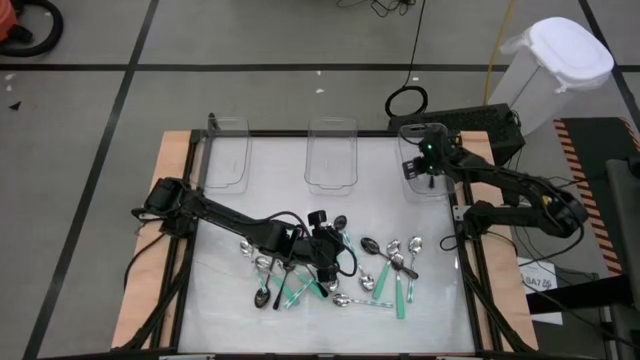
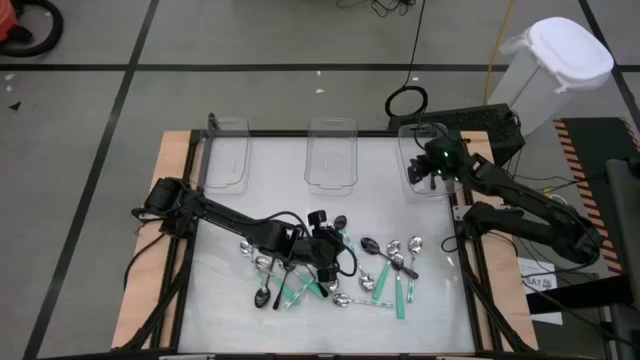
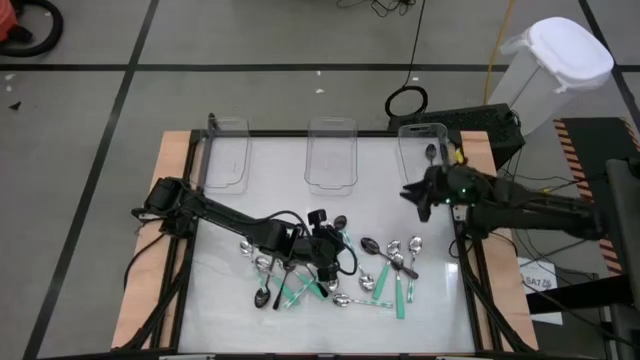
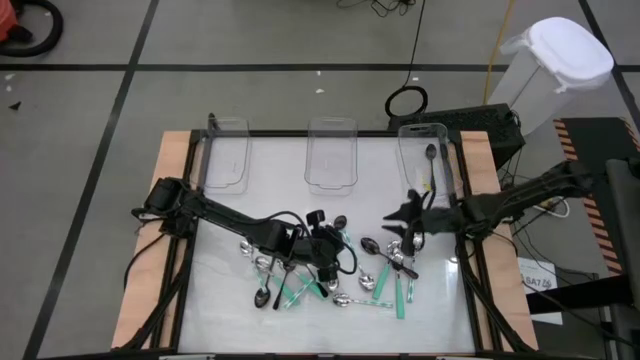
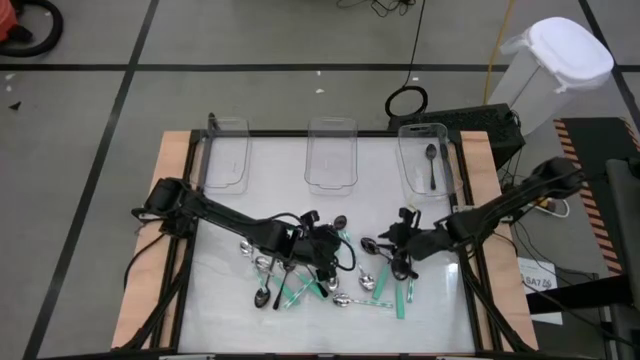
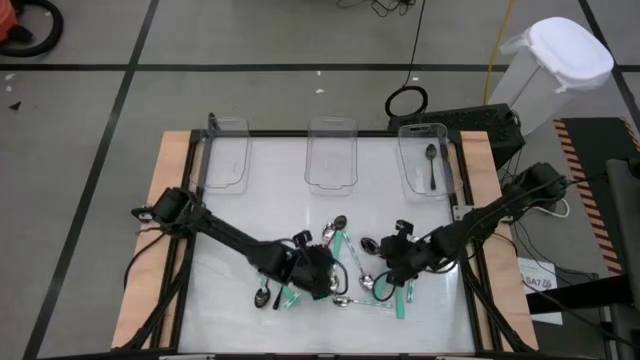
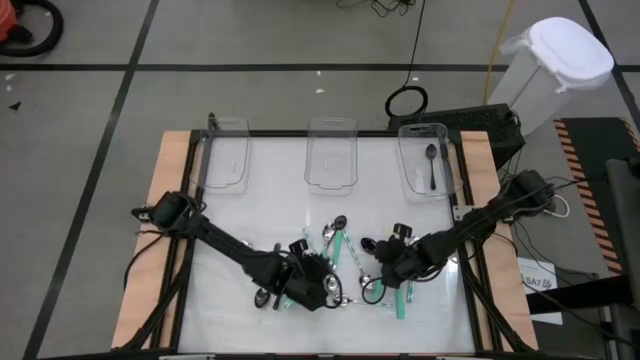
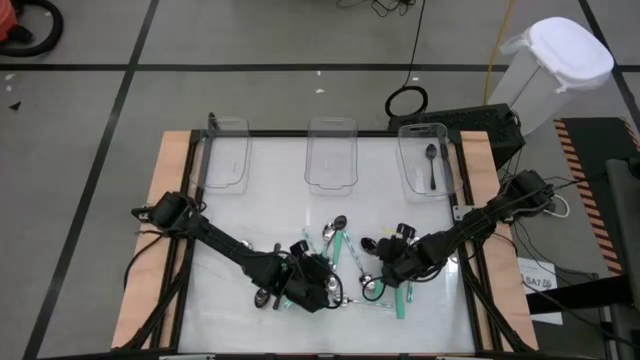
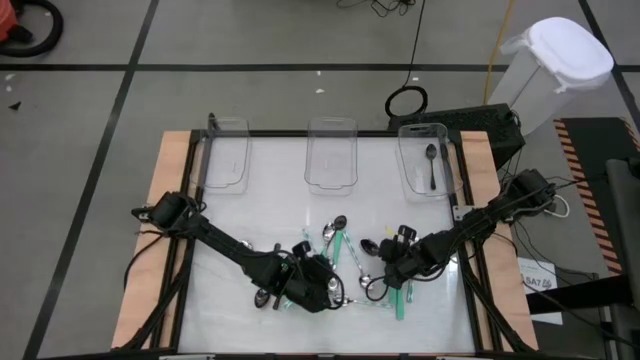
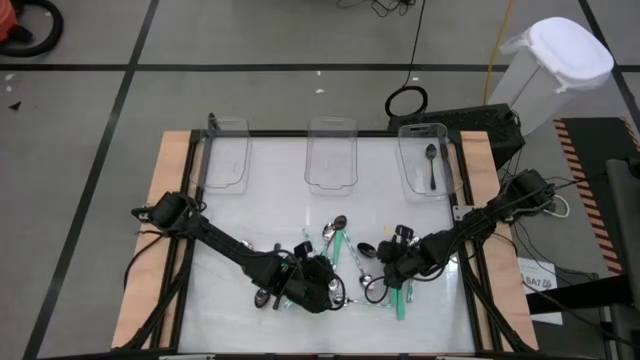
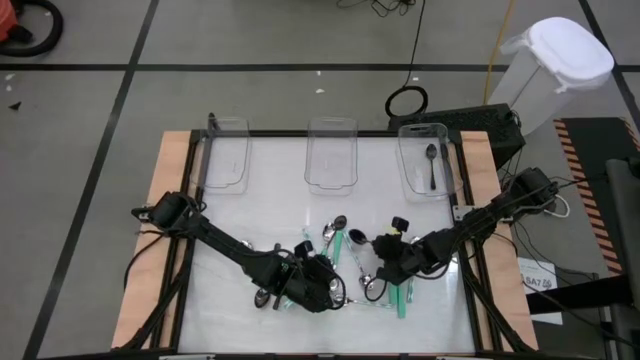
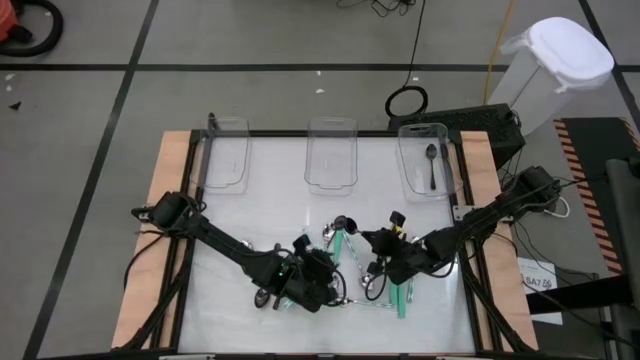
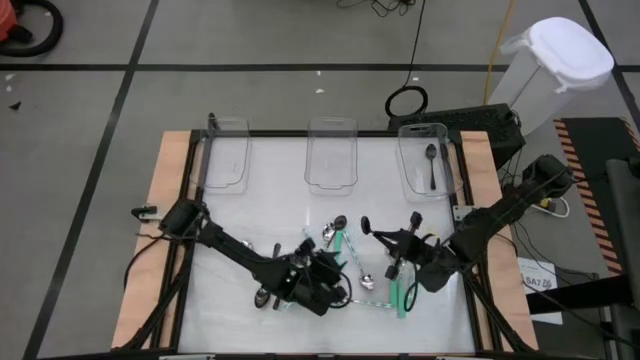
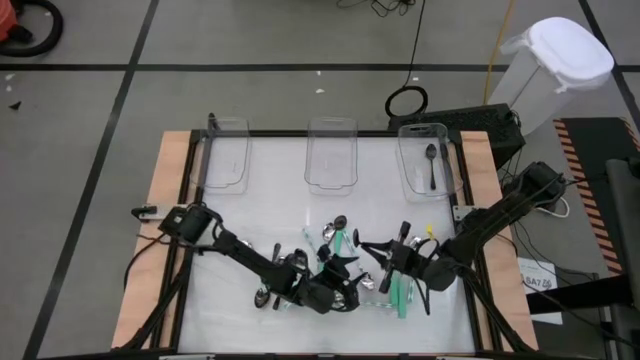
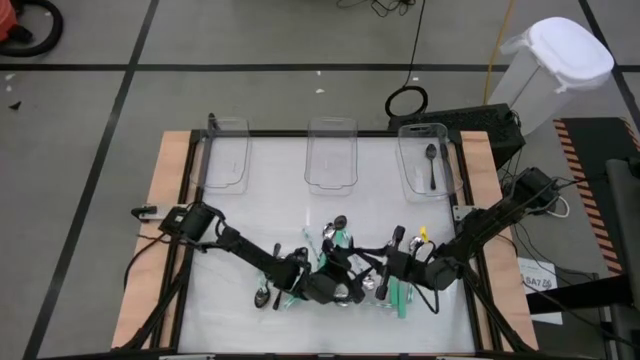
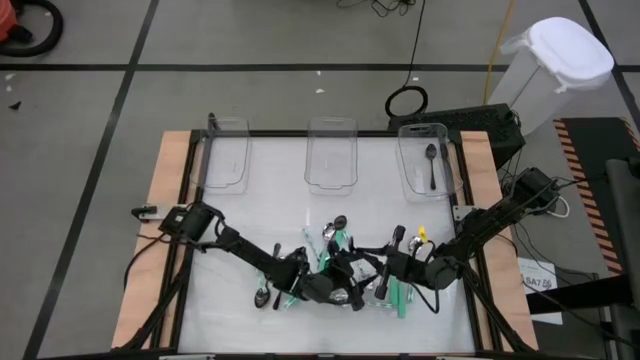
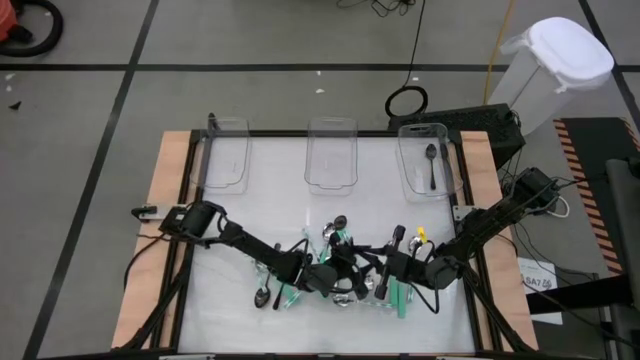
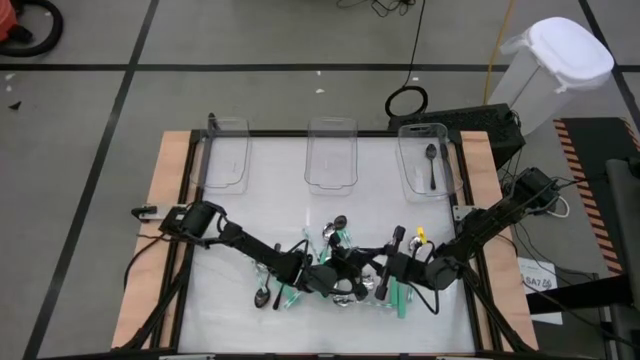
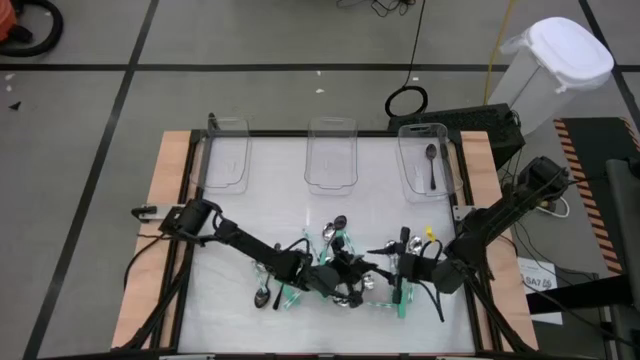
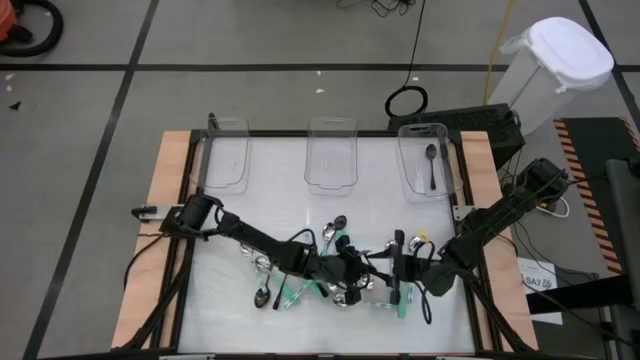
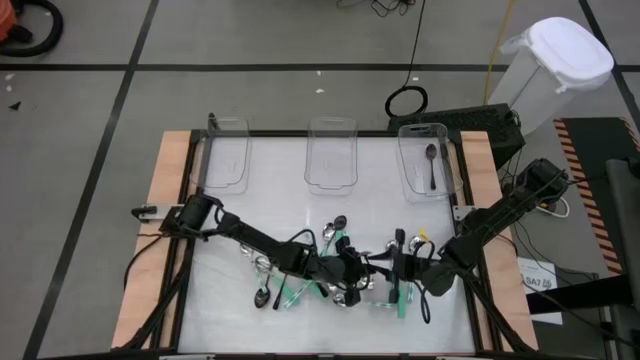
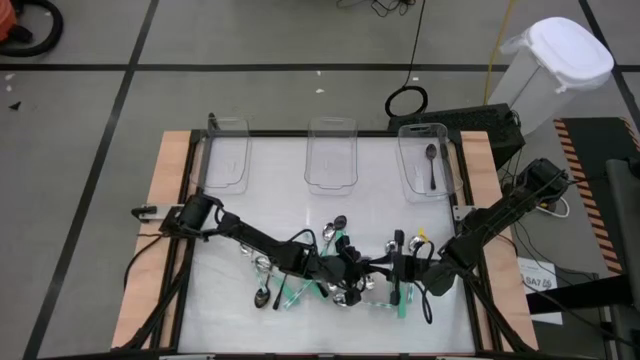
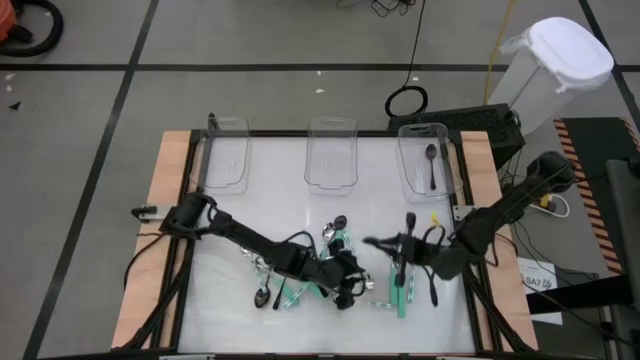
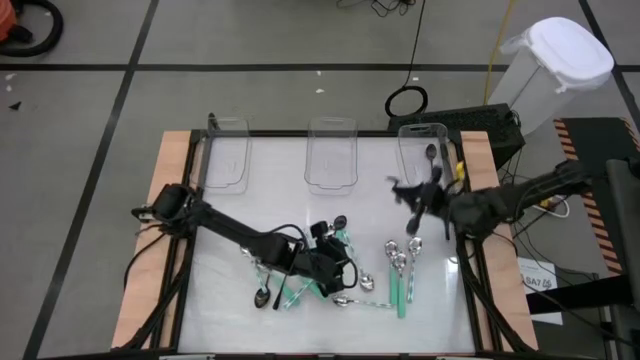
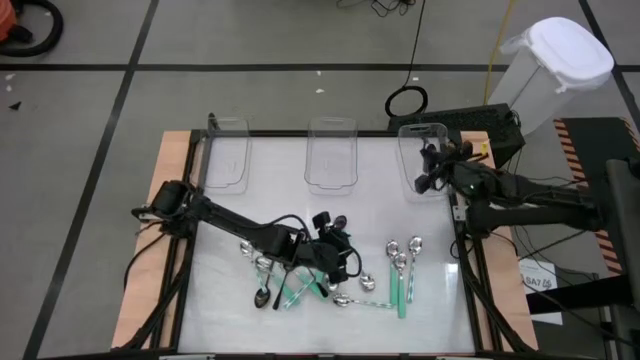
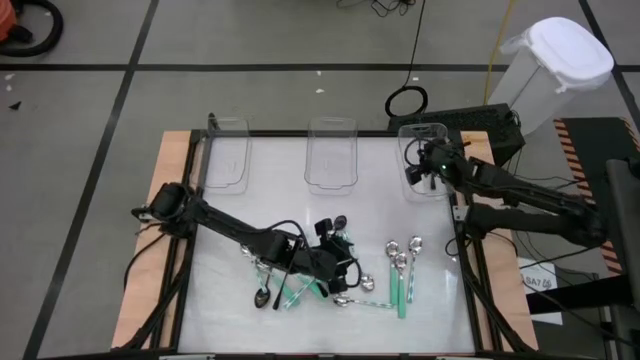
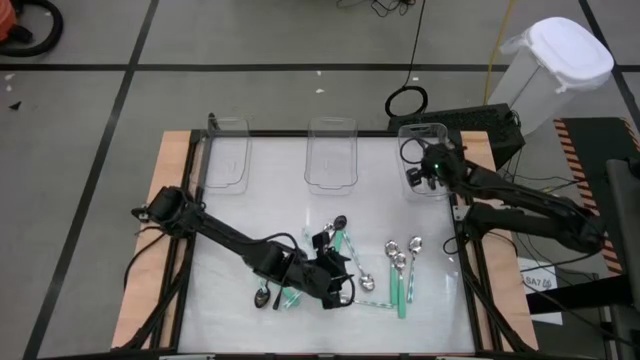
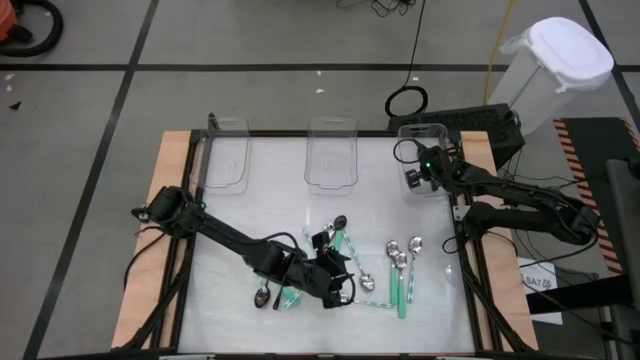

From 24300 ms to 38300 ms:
Task: Sort silverware by color (type)
Put the black spoon into the right transparent bin
